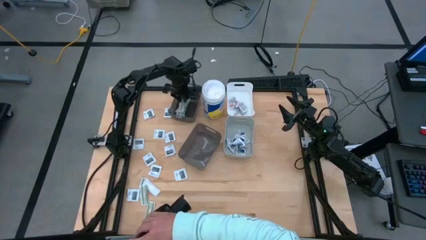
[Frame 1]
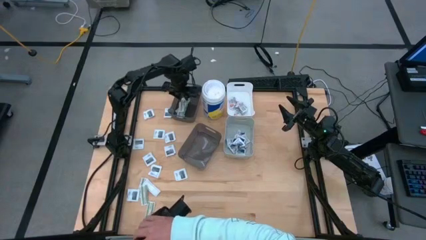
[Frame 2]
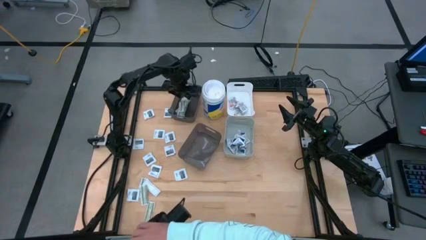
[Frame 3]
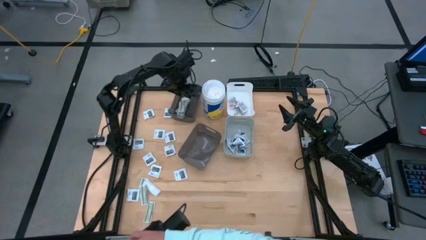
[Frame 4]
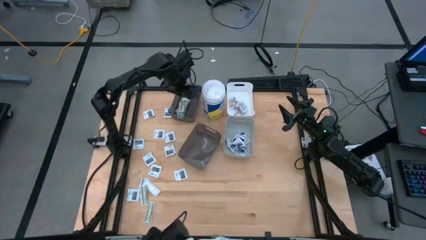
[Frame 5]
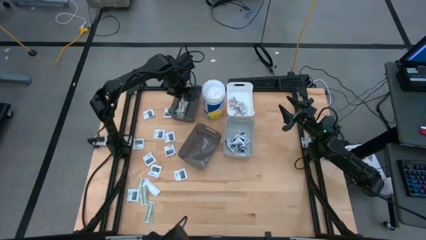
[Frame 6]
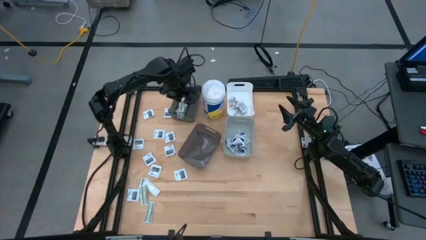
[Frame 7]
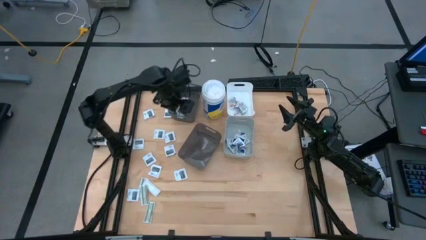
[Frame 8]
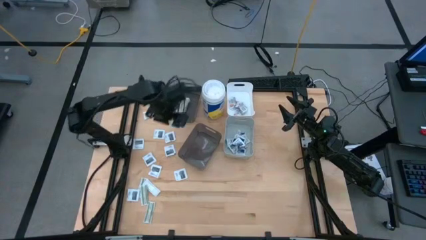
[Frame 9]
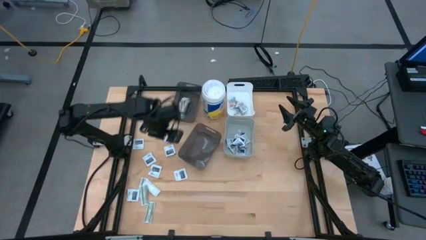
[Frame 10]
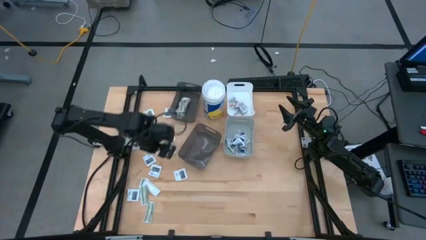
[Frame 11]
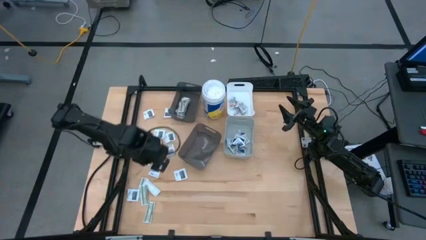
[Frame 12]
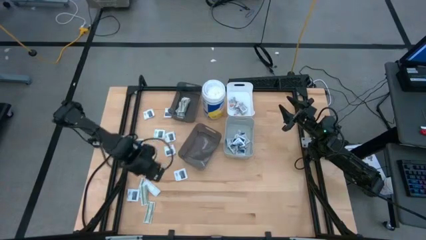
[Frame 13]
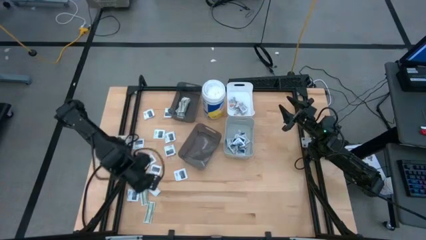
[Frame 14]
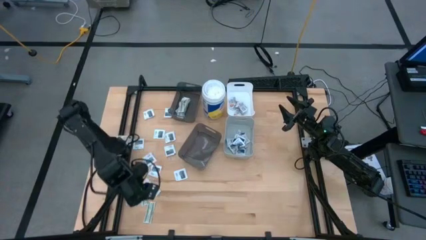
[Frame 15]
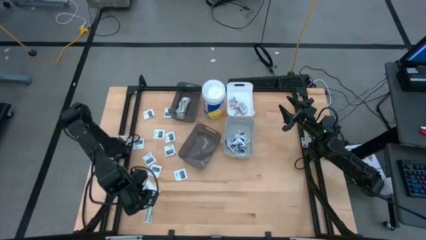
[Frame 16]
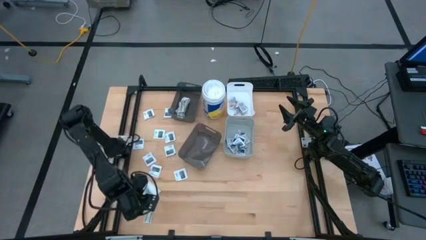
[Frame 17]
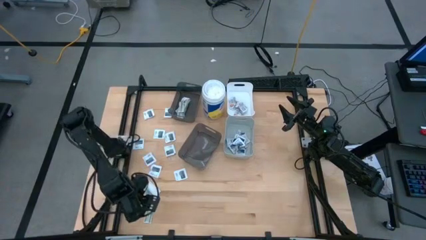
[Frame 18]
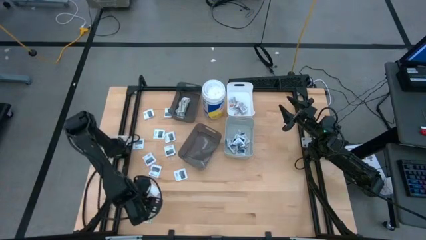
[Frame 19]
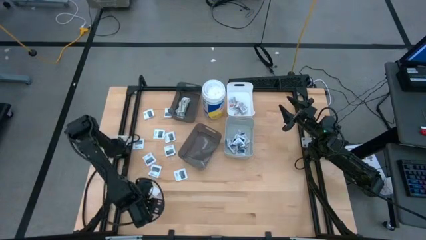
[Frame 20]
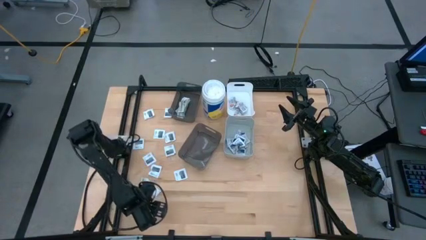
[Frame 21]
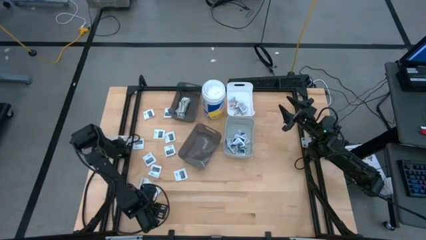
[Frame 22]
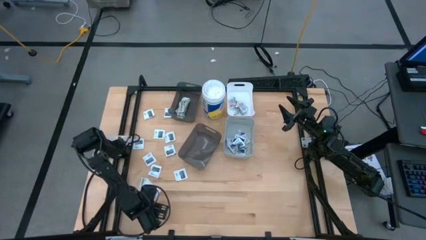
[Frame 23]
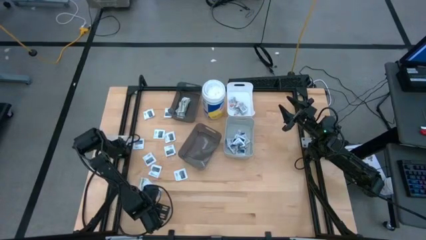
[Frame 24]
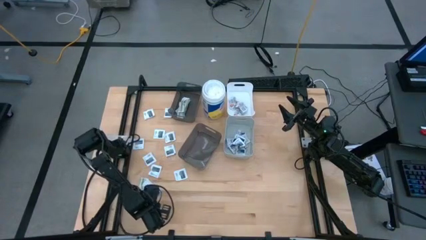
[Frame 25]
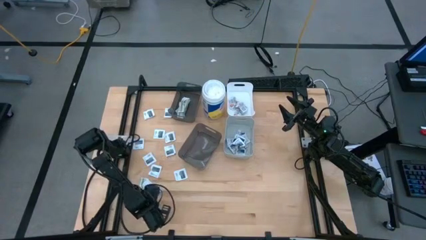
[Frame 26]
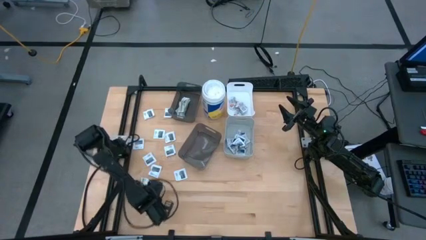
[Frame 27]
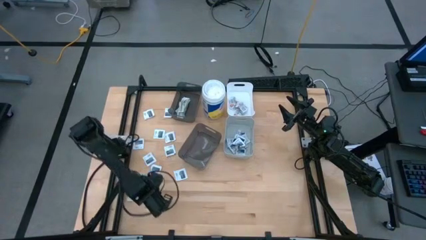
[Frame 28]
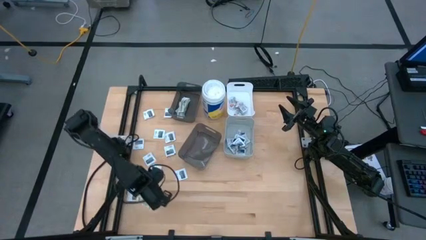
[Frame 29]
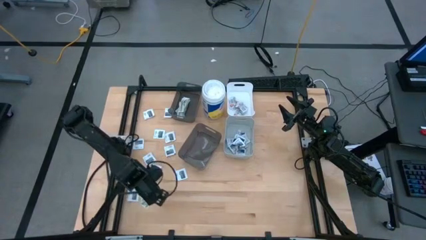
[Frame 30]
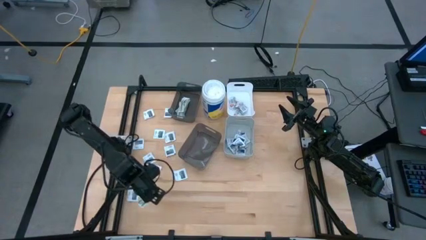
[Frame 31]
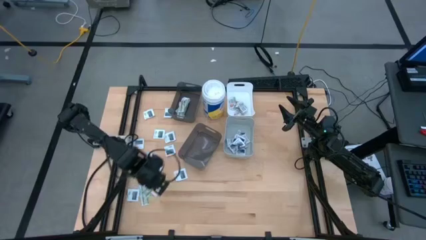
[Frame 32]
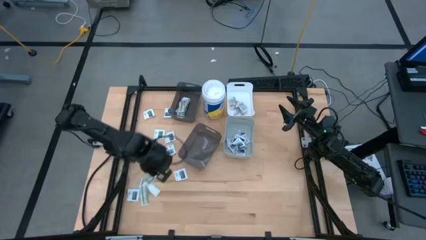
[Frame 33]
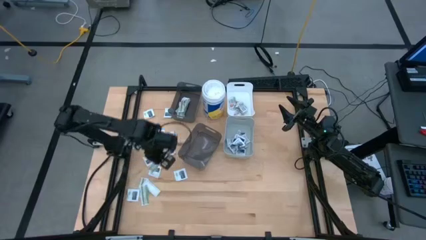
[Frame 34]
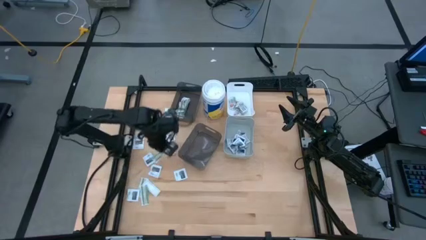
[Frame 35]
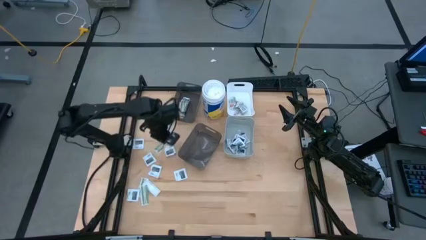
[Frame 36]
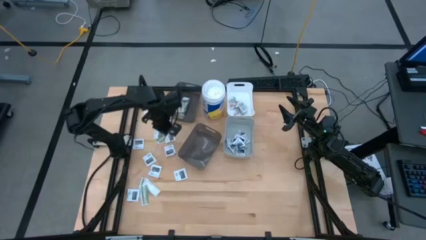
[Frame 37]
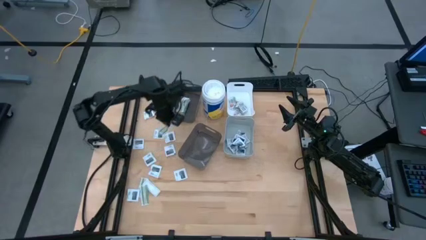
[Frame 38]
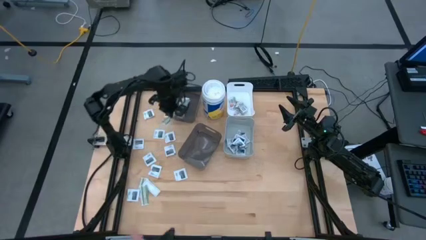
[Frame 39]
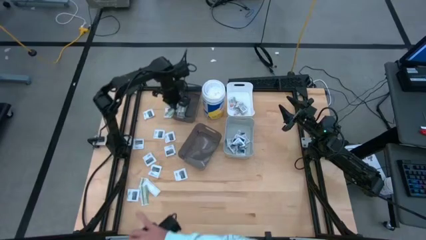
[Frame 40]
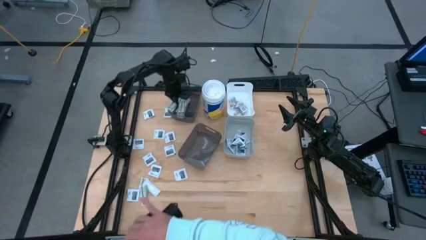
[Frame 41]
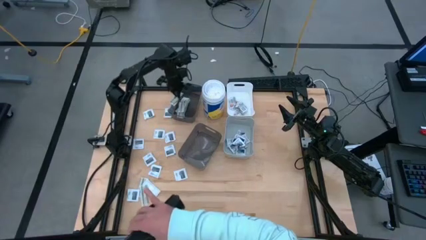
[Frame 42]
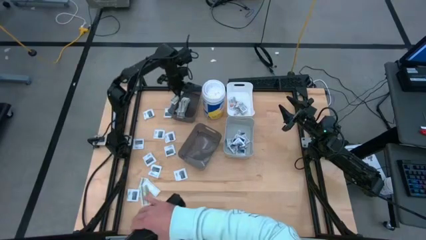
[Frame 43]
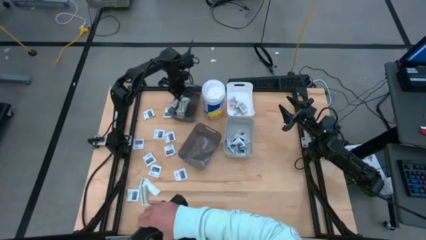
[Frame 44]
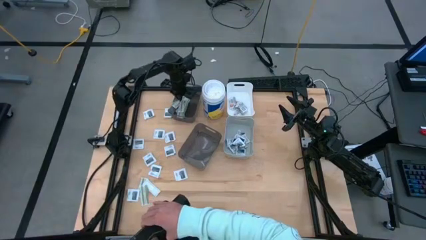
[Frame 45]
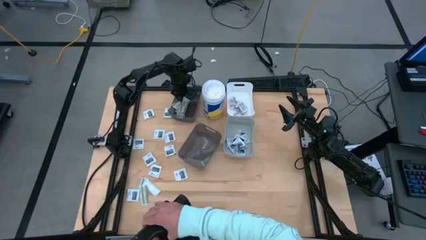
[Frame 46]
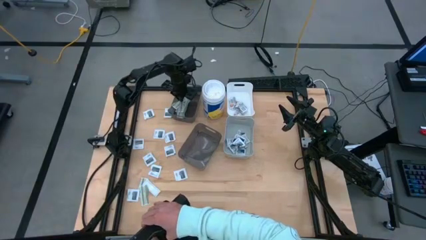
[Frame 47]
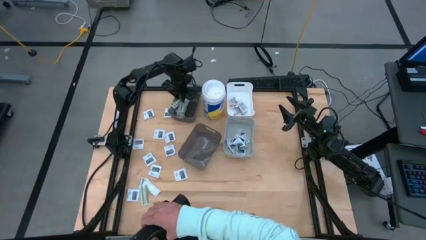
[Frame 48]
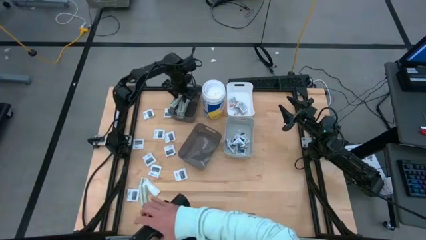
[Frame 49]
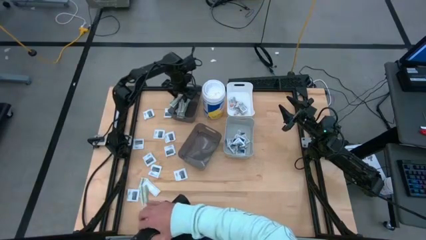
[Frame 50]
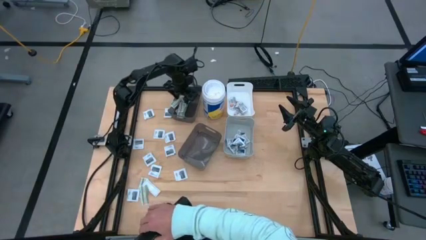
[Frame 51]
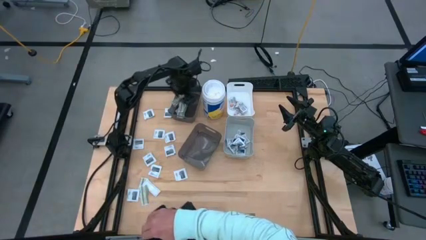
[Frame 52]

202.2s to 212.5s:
Task: Pick & Place First Aid Supplies
Put the bandage pack into the top black bin

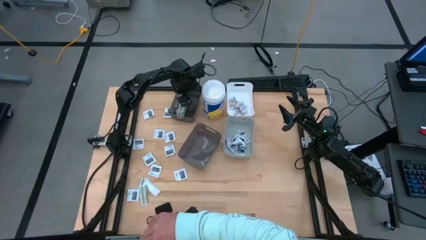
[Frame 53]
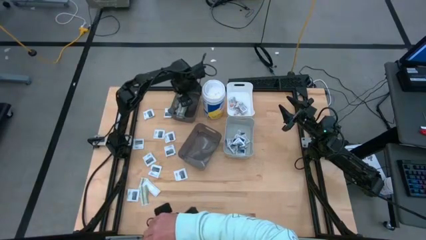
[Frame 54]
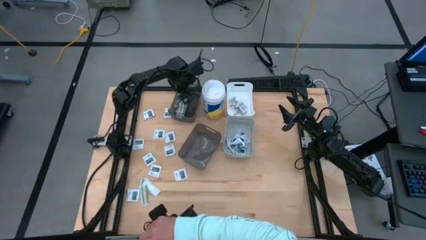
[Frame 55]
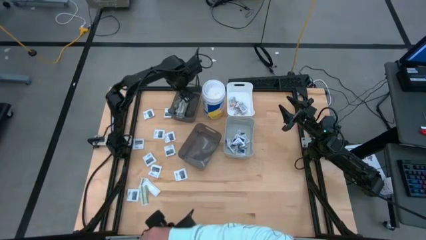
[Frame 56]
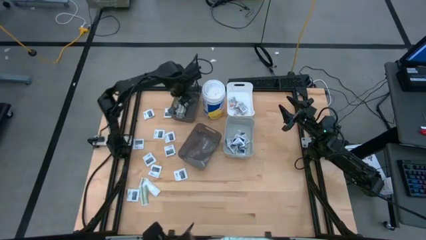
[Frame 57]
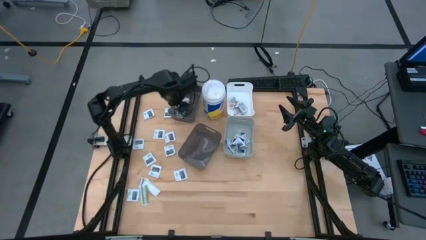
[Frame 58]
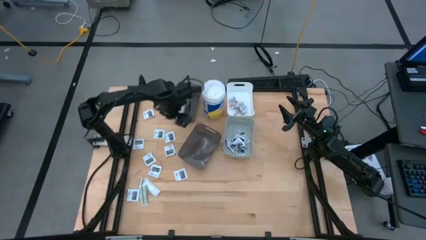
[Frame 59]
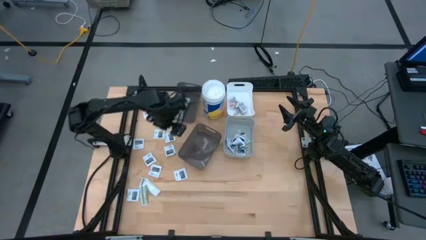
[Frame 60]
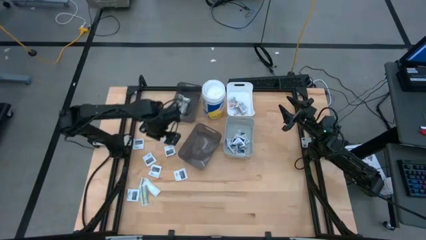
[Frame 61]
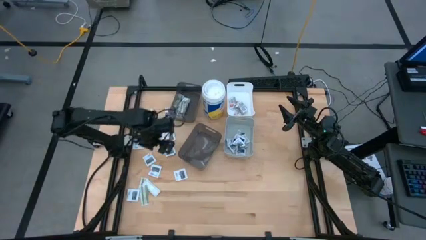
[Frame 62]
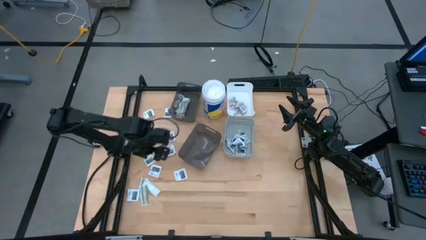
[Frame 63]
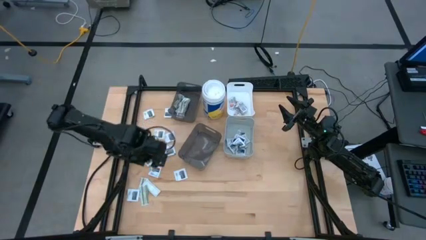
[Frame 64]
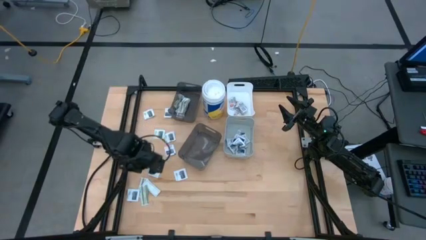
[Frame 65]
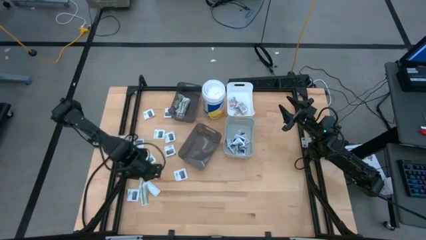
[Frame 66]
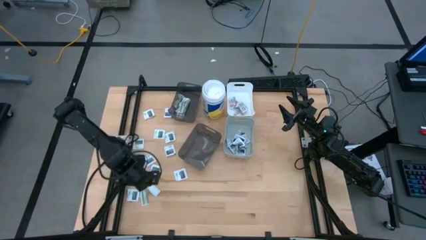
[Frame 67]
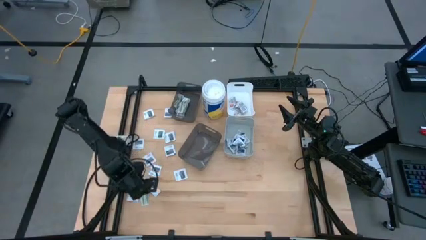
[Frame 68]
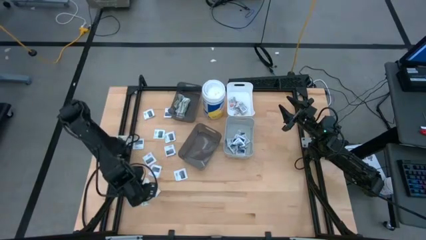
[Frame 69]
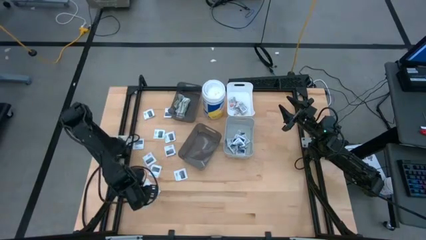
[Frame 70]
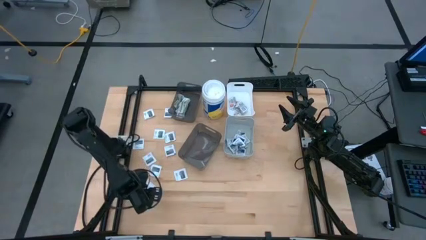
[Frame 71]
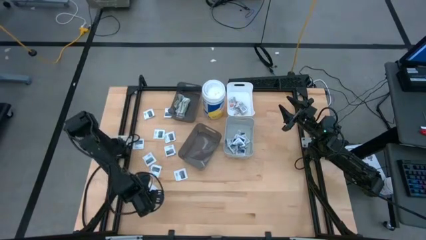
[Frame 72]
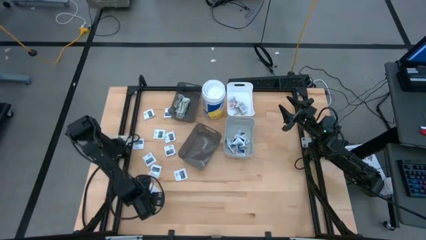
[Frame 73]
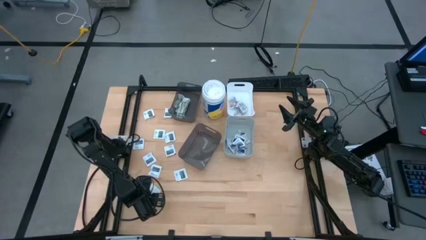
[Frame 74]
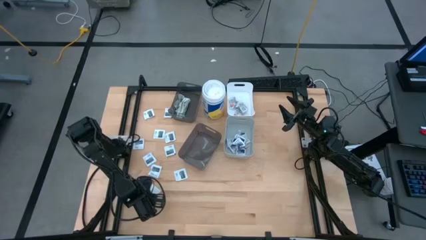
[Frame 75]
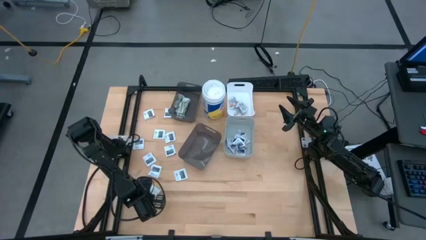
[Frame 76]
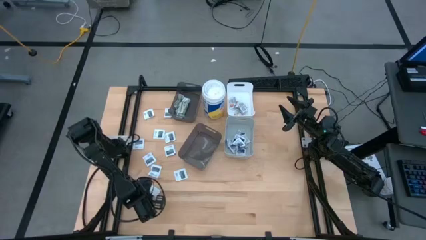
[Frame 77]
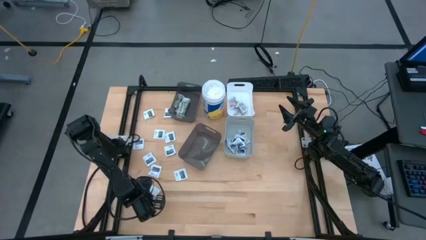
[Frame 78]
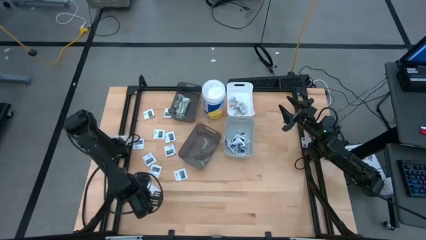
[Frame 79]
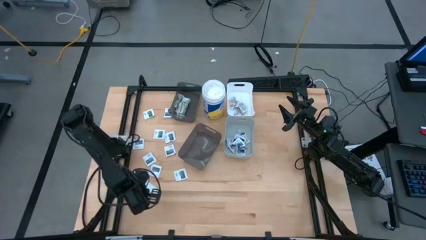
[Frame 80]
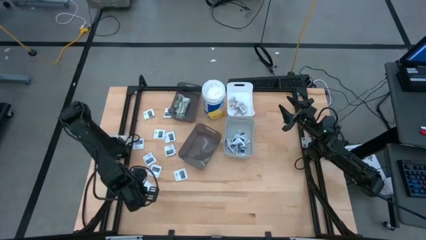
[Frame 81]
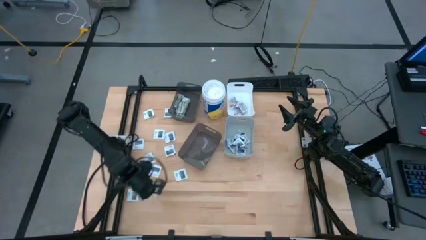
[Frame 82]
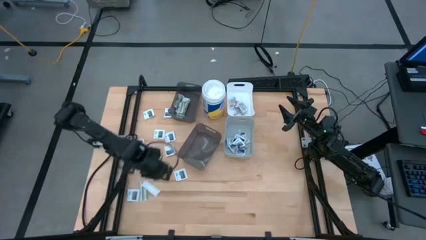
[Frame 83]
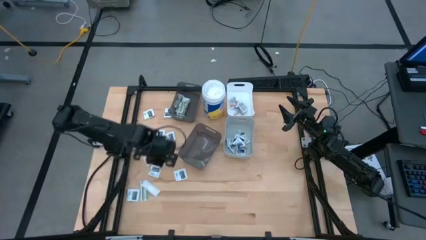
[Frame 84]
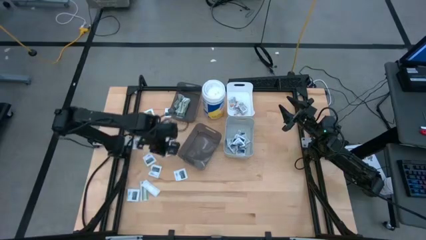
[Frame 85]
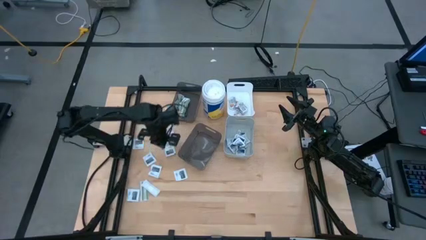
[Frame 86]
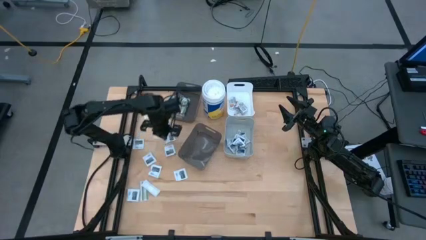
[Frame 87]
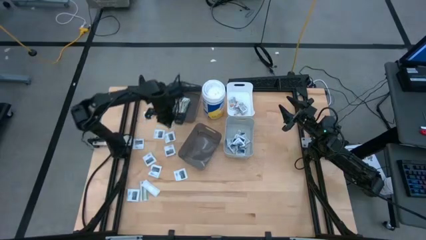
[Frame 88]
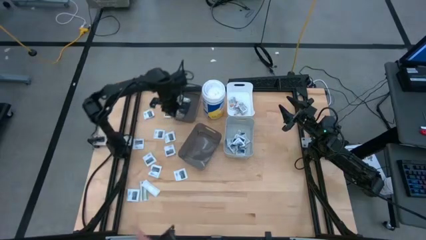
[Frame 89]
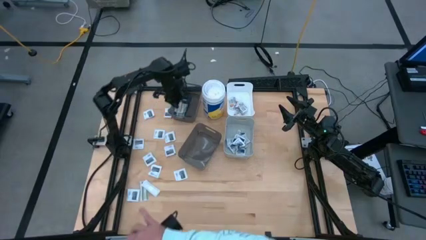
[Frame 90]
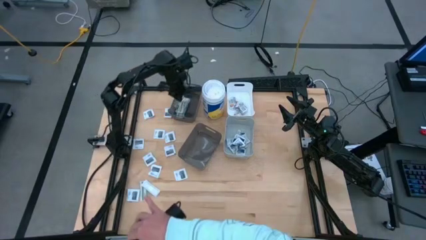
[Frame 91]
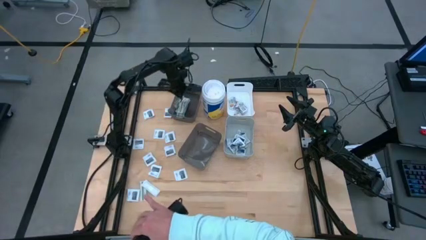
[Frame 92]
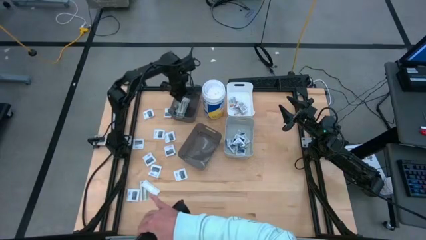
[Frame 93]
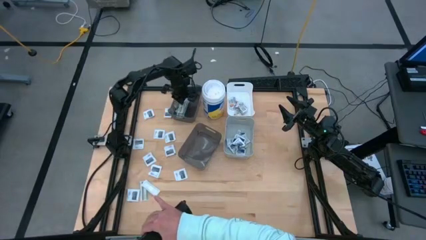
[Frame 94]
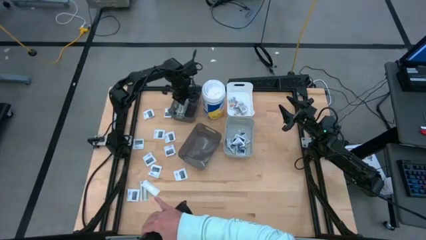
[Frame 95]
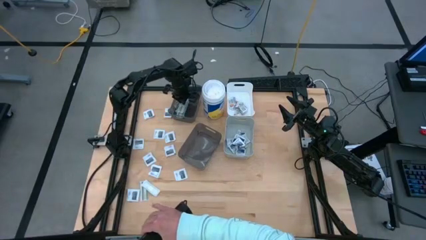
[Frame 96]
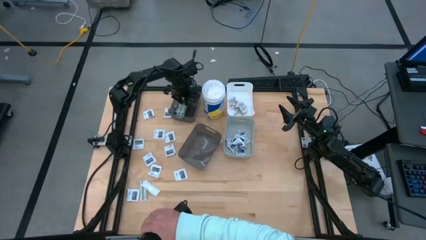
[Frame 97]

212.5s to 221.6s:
Put the bottom bandage pack into the top black bin
